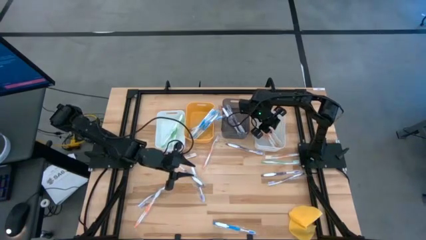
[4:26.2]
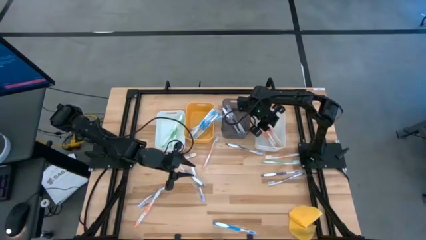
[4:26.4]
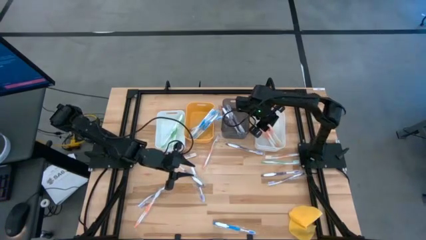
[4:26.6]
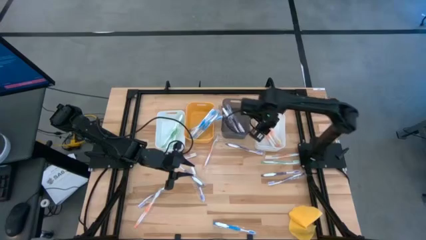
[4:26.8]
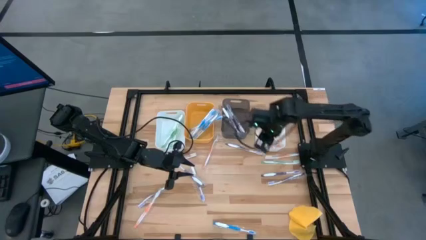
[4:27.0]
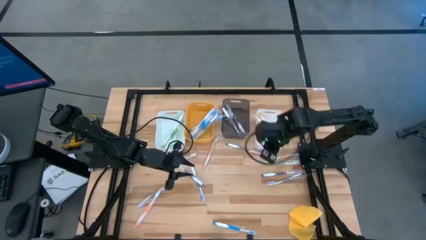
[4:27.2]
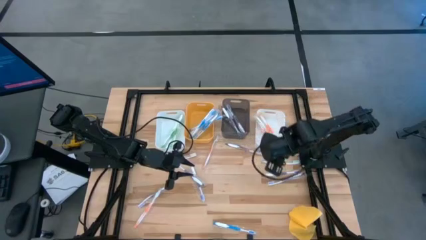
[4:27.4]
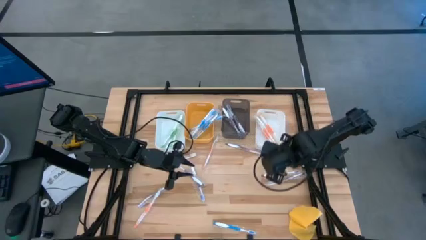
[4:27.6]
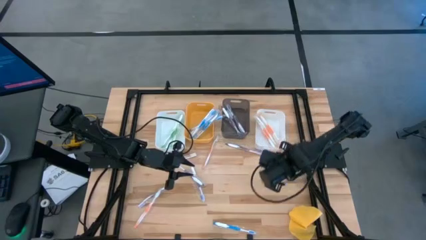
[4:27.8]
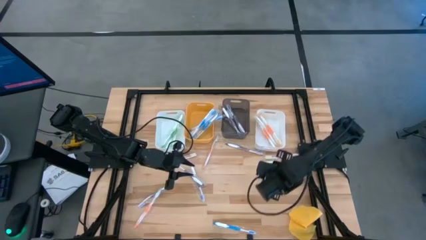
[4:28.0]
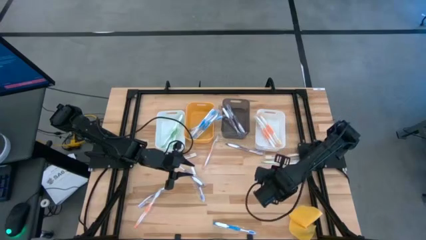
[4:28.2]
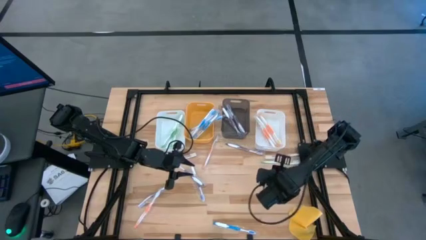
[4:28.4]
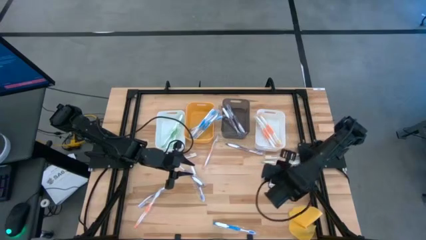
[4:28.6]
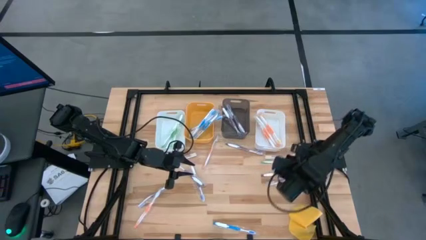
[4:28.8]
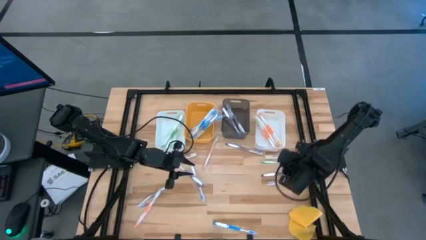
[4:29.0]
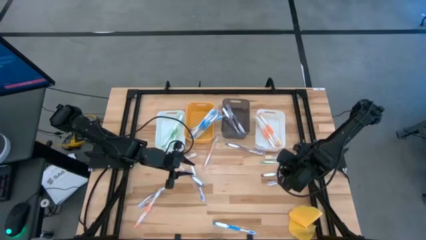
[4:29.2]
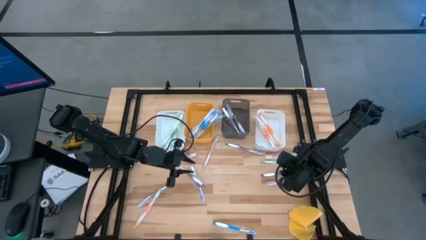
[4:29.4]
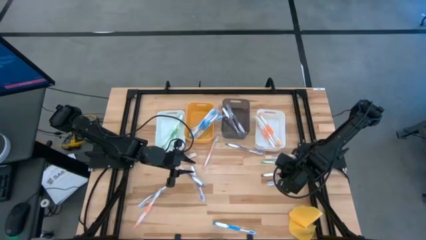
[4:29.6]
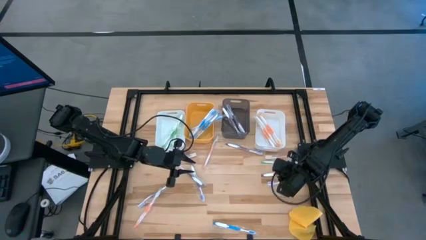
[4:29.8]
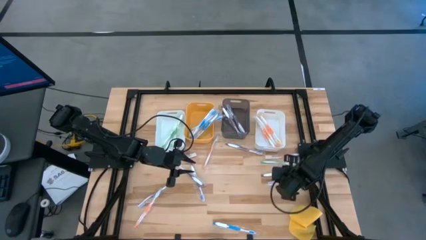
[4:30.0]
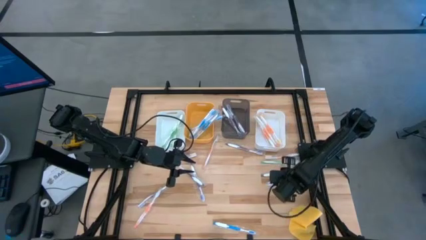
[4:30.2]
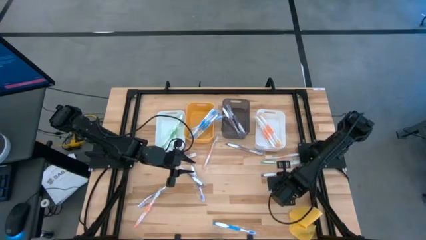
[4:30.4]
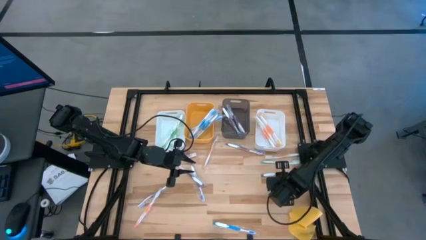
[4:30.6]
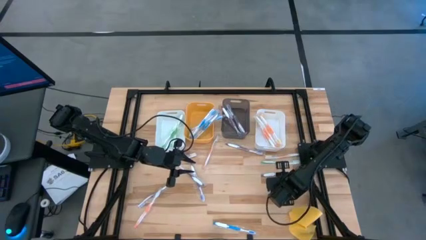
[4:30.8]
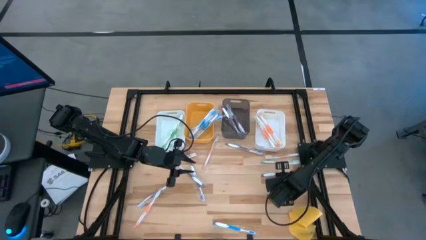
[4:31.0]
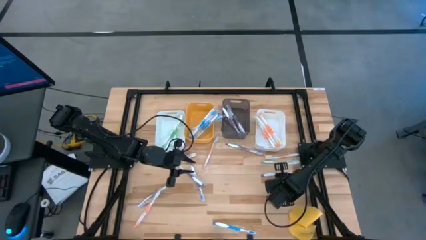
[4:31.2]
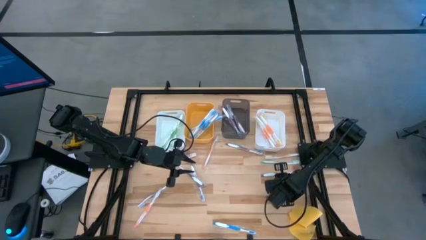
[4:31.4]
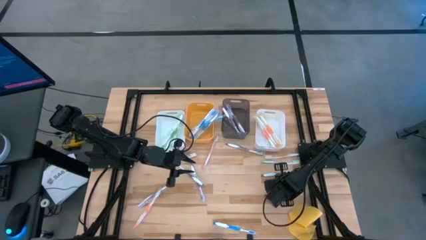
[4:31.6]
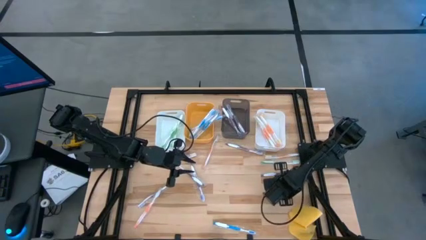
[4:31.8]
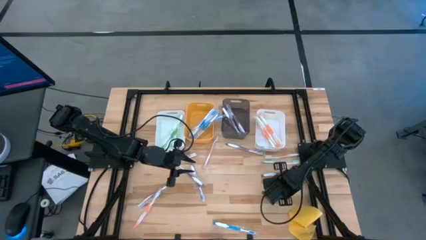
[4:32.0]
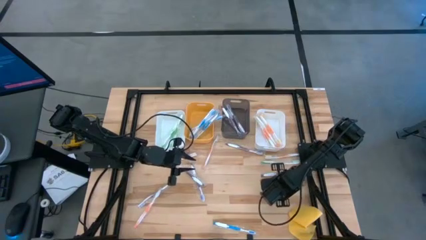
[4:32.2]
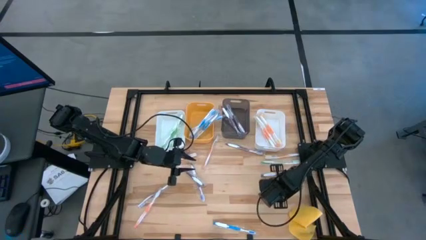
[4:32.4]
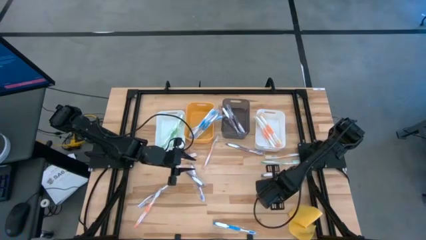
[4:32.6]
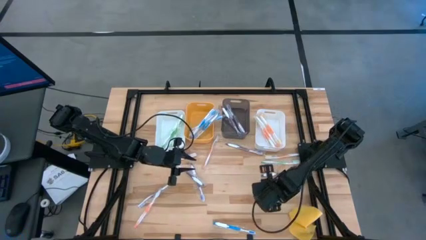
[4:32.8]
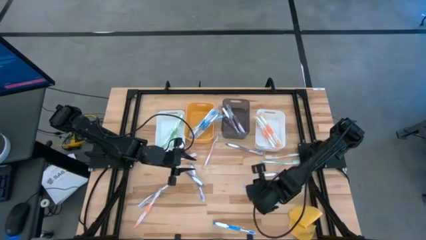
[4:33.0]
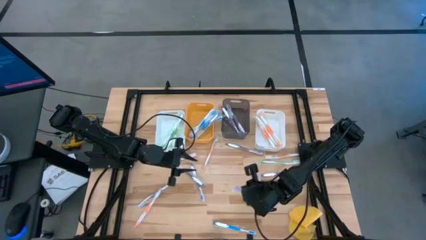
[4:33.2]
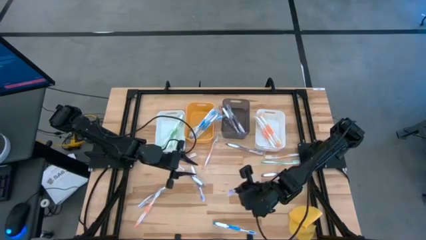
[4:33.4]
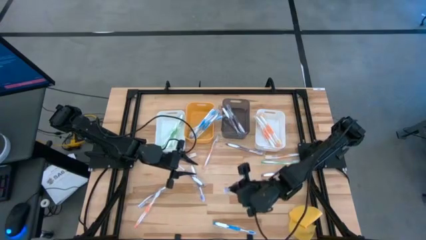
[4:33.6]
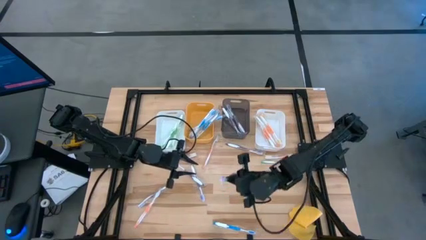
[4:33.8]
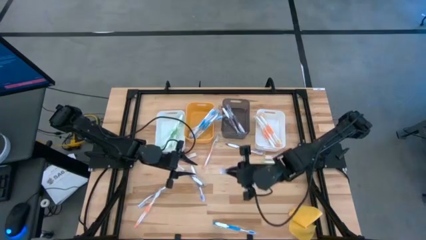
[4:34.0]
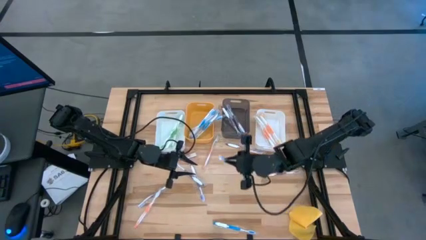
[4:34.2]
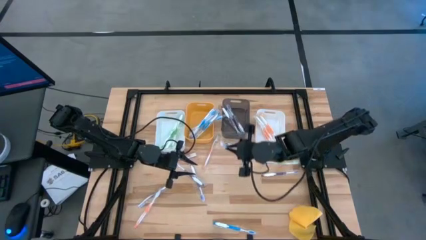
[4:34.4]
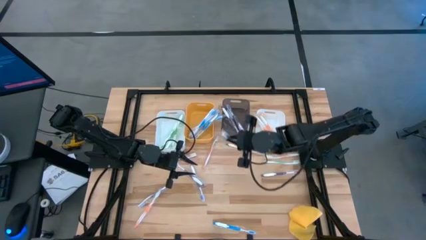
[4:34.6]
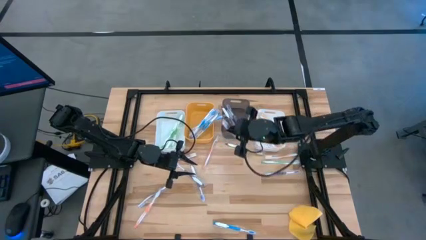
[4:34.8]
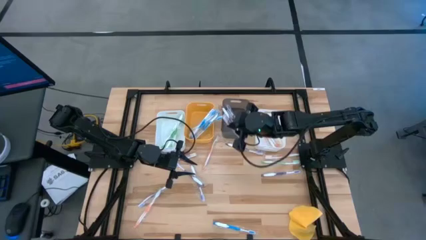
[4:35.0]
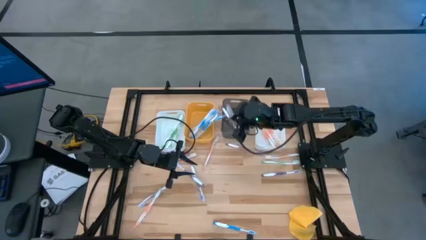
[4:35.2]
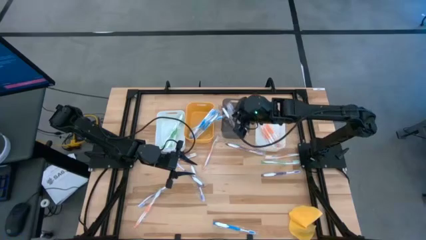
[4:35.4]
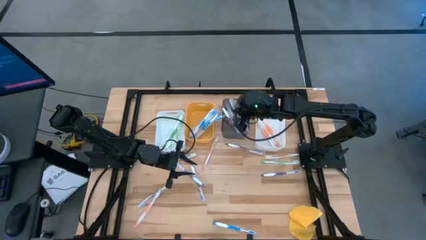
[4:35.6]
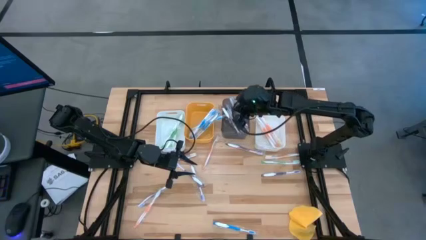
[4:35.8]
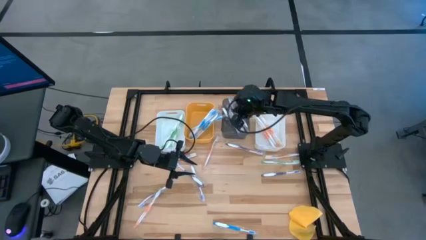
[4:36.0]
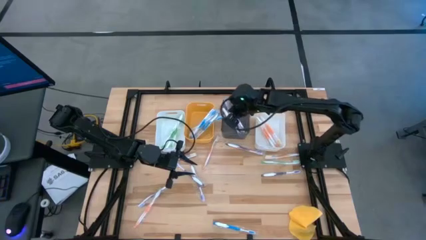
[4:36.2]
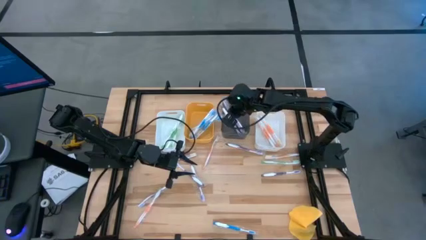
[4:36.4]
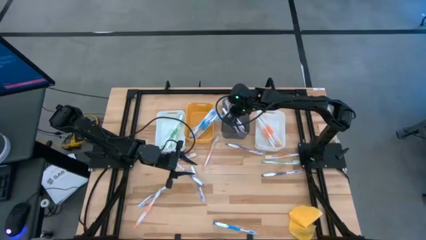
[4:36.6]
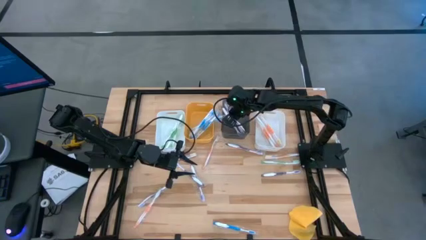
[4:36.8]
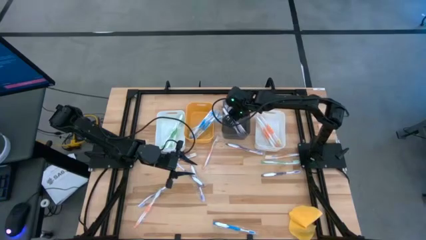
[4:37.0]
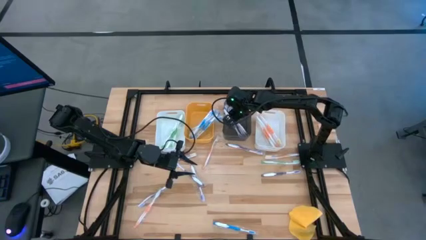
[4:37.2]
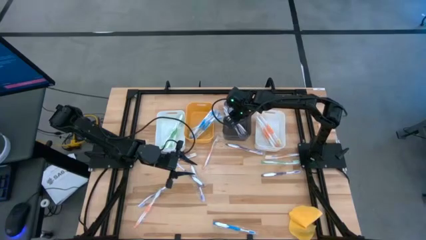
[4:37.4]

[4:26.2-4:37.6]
Task: Pick & Place Toothbrushes
Put the purple toothbrush into the black transparent bin

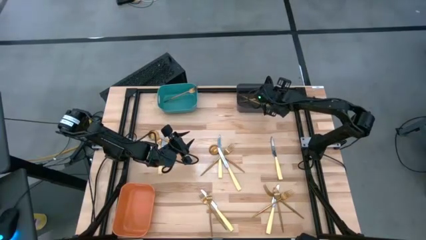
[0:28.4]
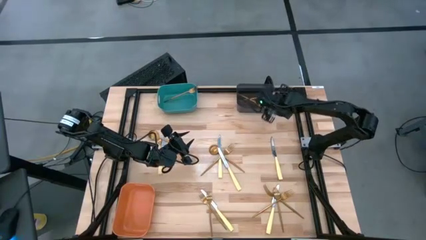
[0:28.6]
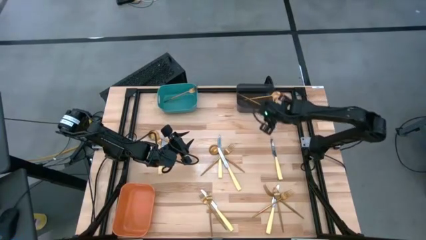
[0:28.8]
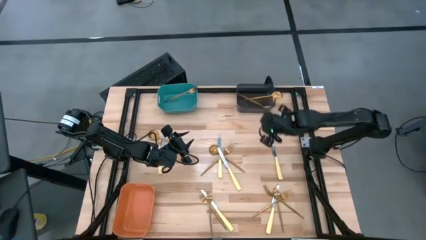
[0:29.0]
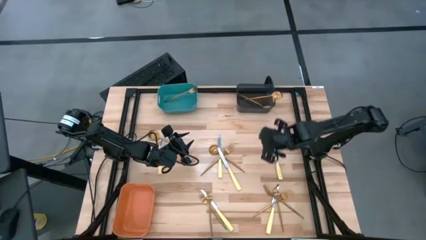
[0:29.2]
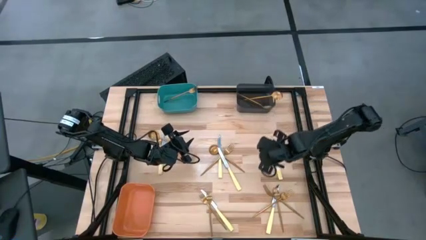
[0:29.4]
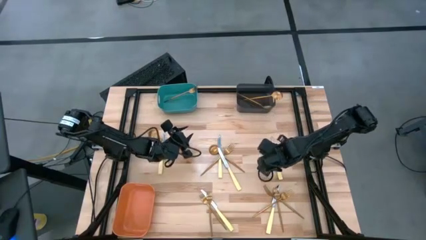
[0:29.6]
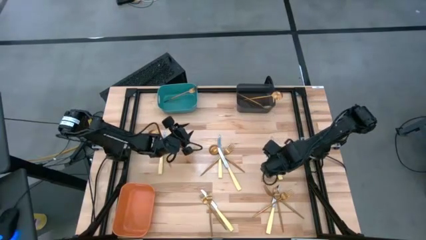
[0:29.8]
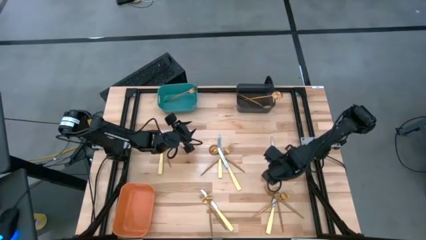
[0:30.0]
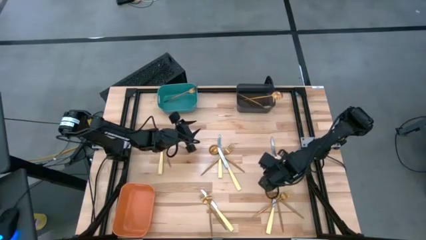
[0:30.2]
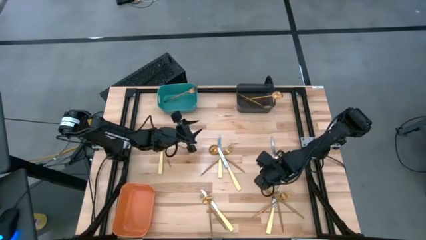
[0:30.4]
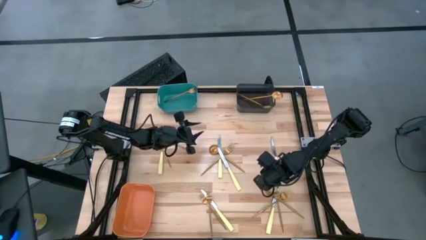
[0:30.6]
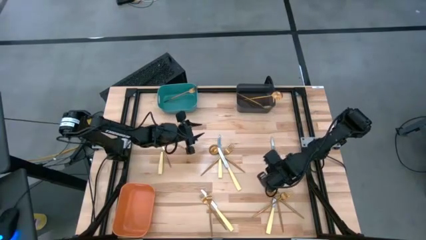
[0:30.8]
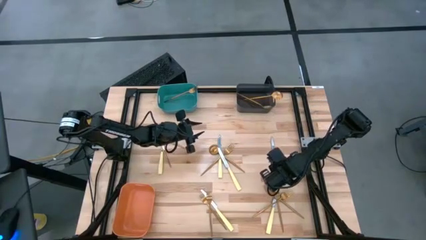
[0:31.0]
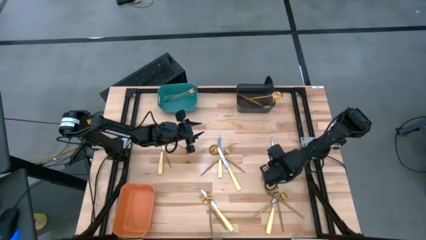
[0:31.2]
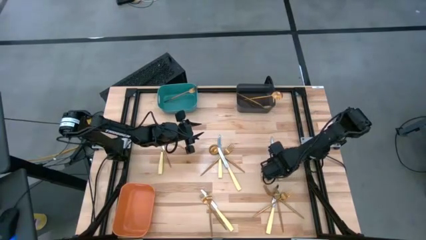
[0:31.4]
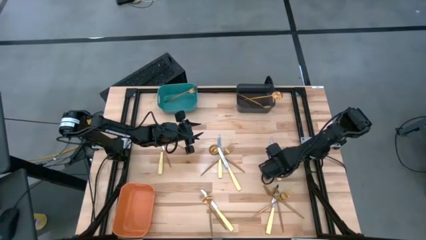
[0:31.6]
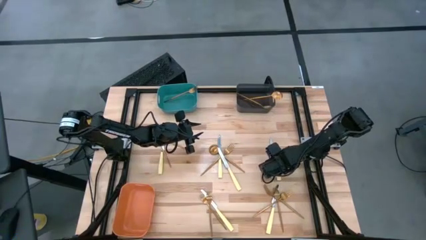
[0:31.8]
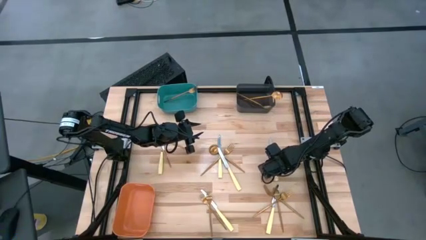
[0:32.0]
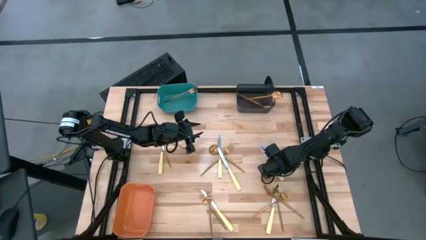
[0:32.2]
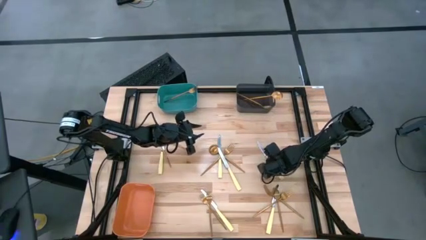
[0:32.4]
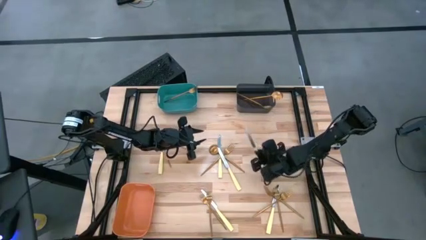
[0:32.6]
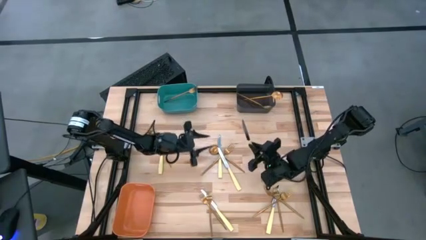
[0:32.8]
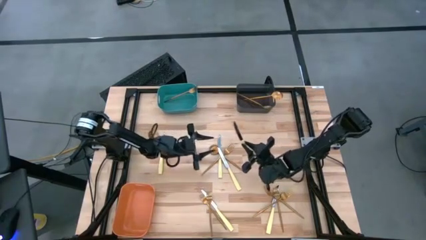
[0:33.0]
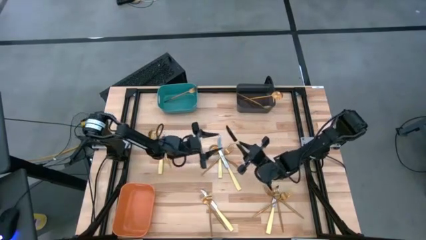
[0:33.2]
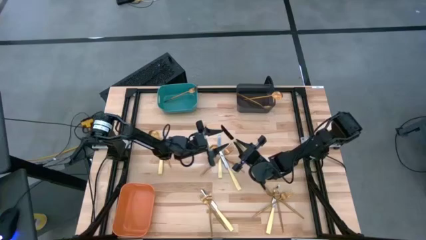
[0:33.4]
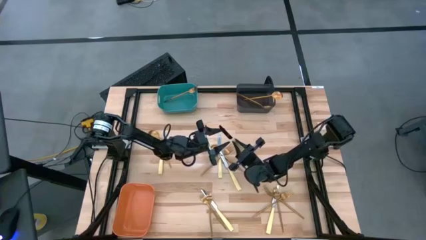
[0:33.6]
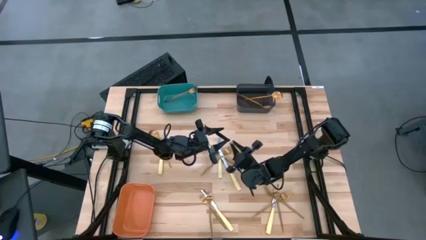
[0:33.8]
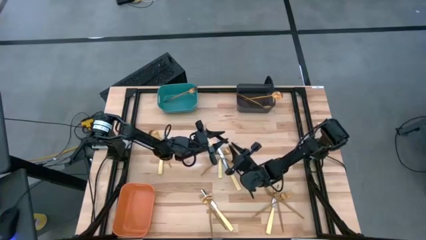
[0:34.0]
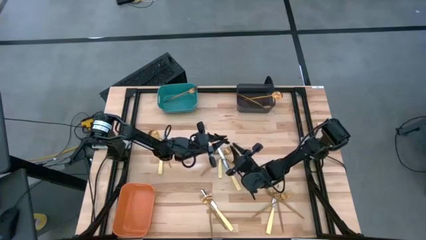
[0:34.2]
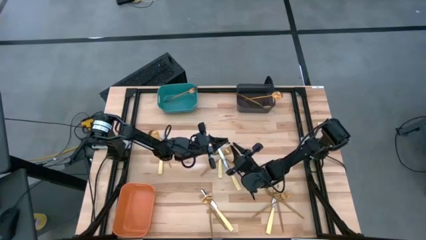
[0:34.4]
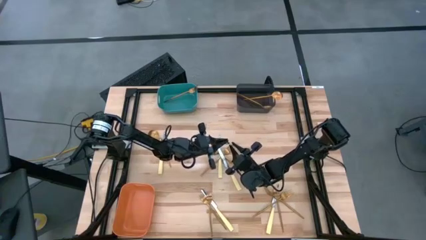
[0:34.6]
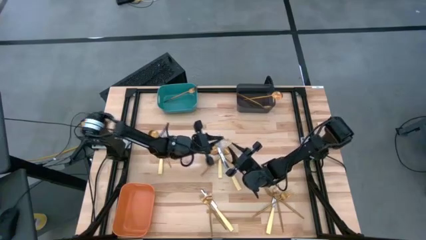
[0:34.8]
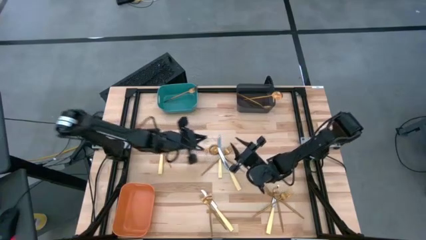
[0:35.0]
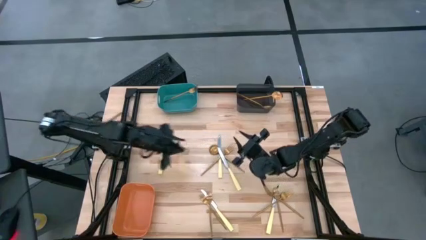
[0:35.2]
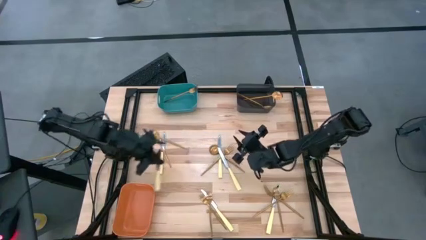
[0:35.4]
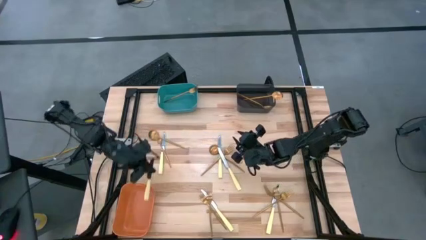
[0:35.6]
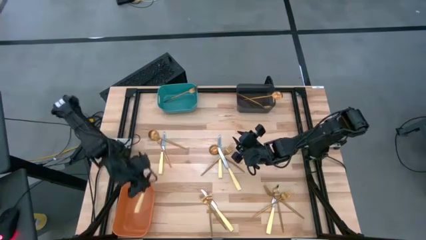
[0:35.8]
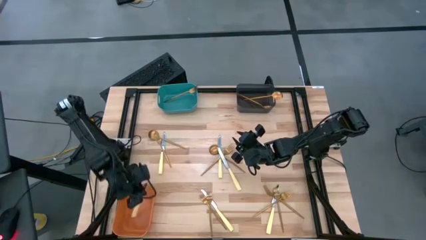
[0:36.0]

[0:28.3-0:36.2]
Task: Sort silverware by color (type)
Put the yellow table knife into the orange bin
